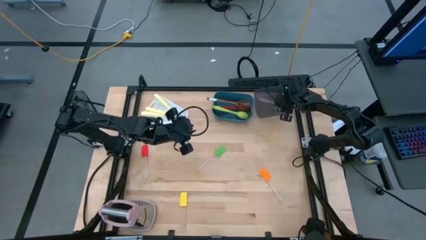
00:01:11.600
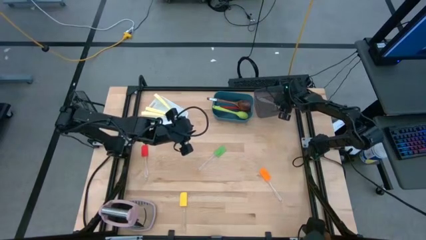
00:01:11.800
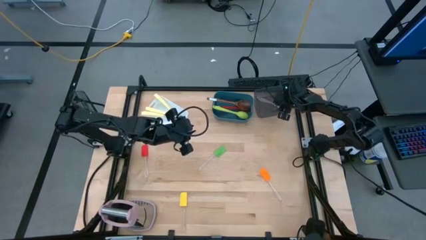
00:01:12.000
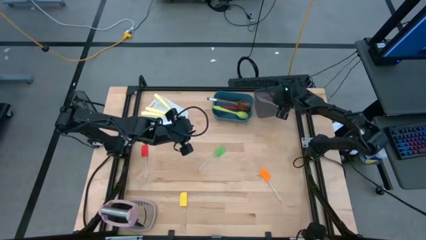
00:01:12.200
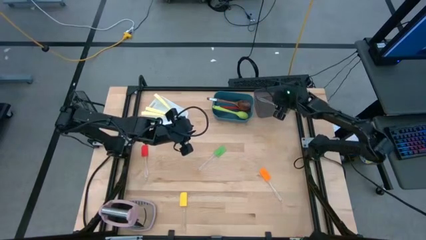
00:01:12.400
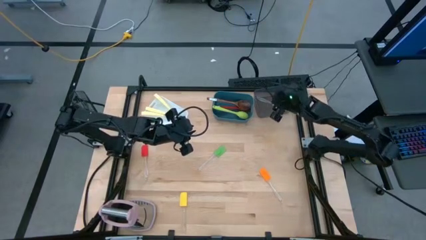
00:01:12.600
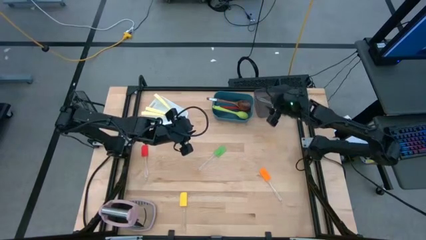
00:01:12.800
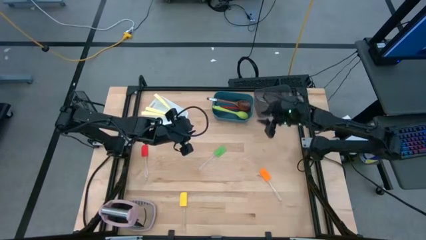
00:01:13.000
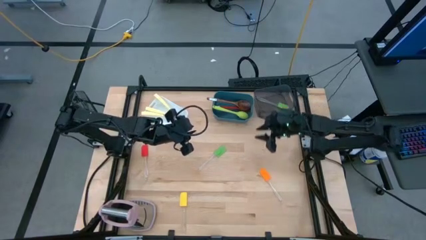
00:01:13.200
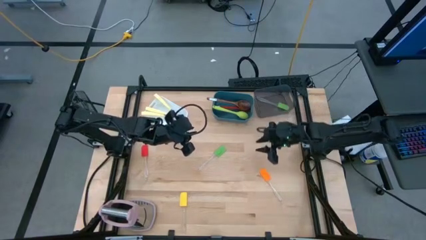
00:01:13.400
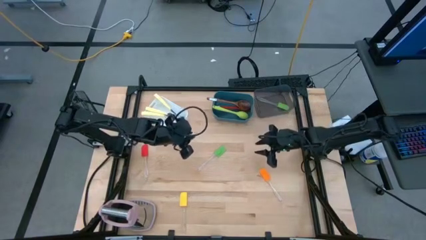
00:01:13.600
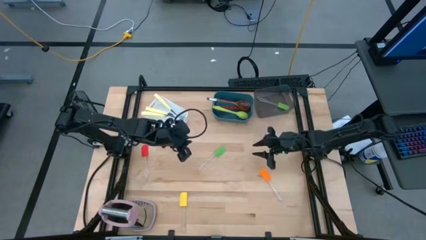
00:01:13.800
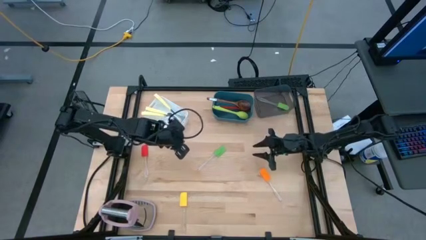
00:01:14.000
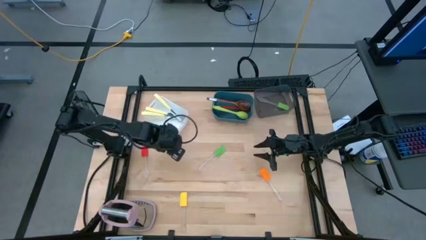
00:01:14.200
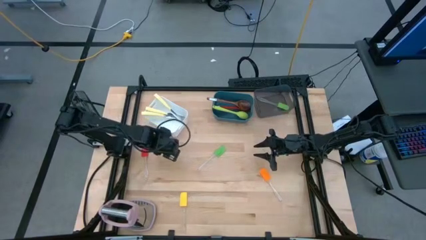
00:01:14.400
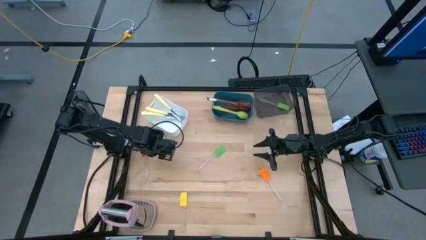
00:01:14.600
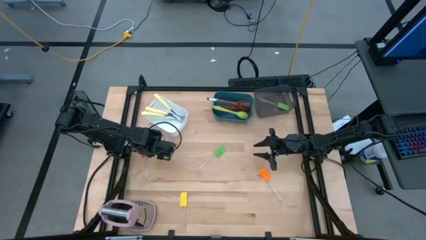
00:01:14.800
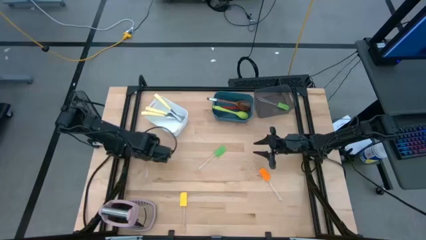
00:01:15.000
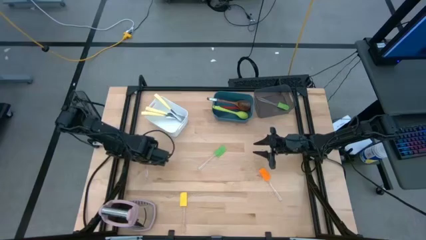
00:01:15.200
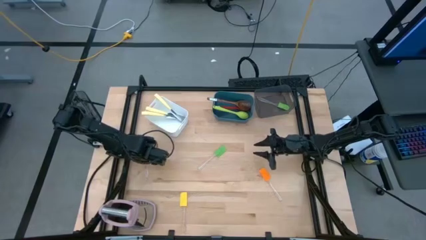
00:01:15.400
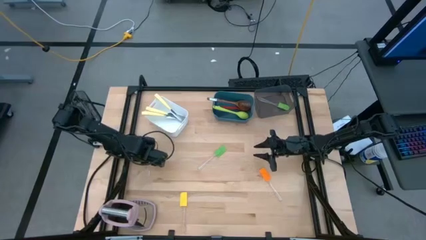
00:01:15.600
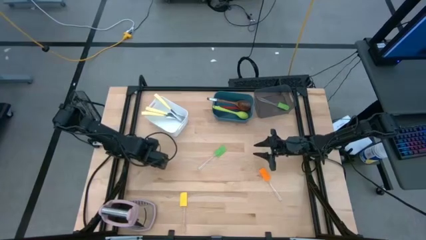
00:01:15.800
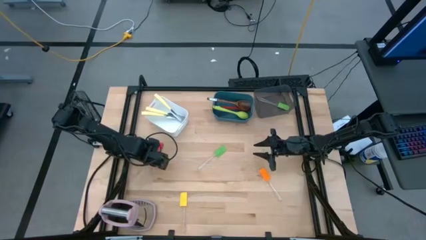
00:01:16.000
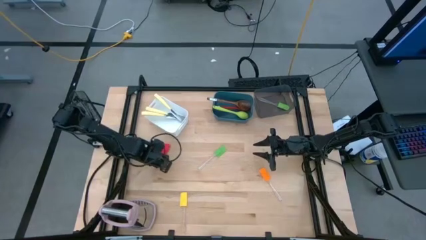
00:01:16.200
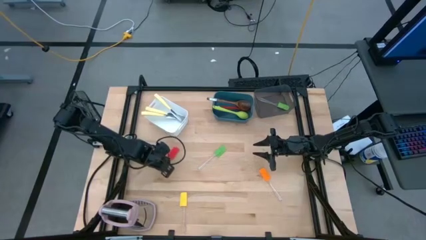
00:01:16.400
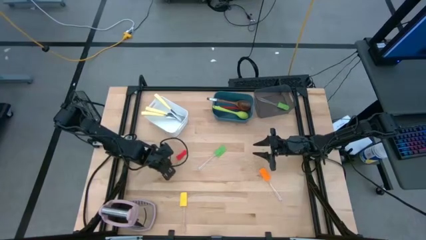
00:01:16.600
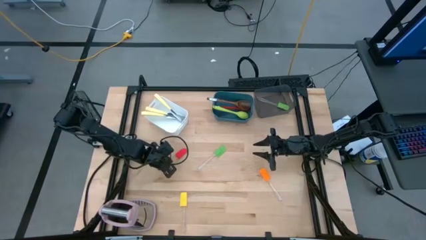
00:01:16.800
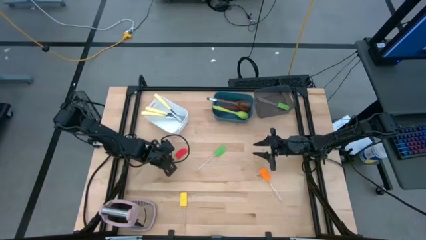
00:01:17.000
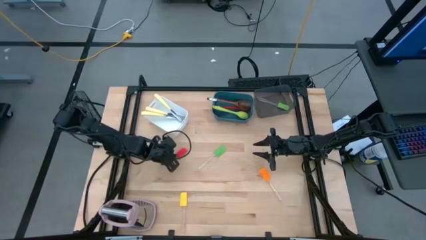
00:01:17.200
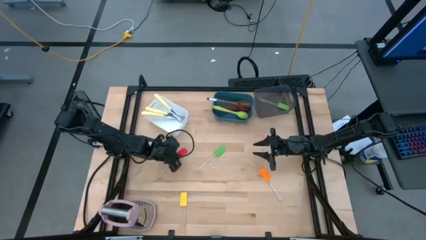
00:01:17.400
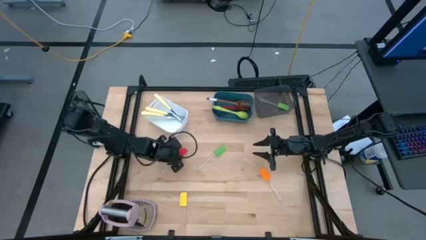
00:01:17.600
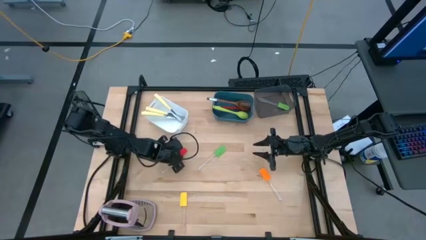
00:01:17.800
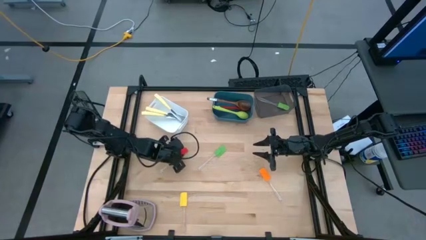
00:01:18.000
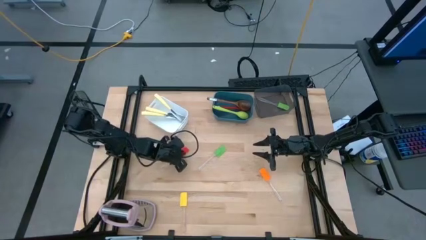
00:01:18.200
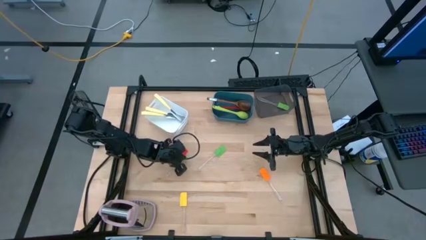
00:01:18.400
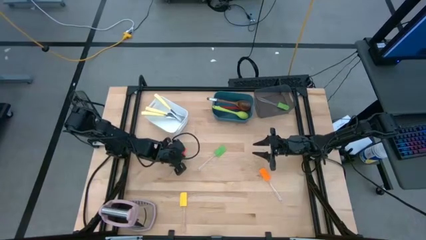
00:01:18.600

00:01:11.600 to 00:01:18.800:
Task: Pick & Place Kitchen Items
Put the red spatula into the black bin

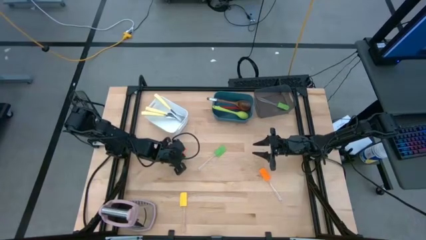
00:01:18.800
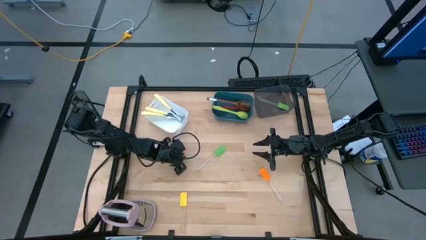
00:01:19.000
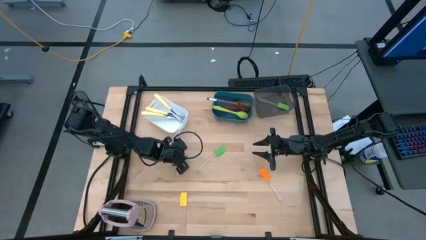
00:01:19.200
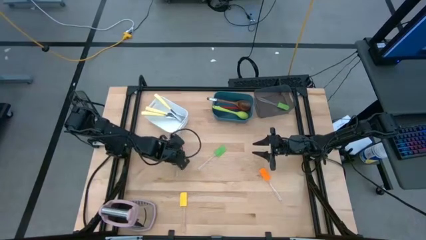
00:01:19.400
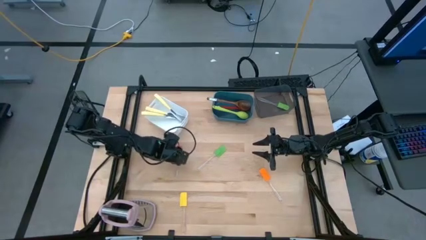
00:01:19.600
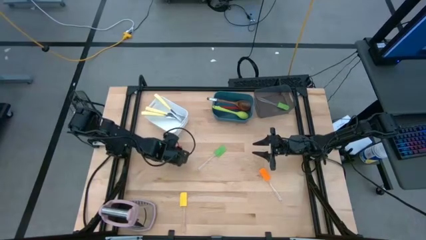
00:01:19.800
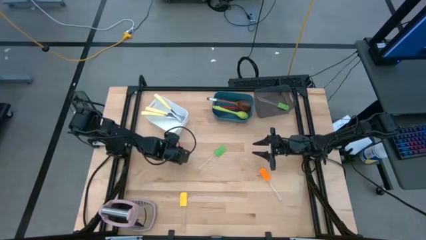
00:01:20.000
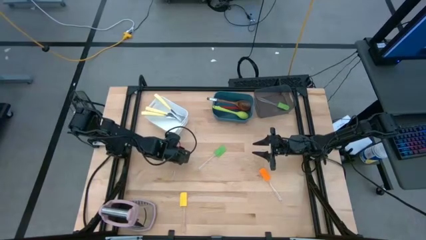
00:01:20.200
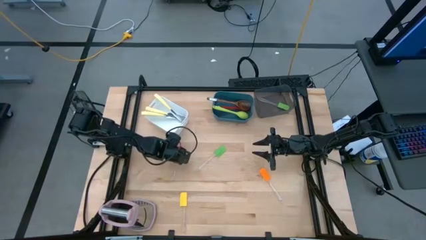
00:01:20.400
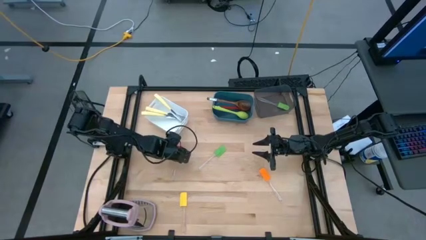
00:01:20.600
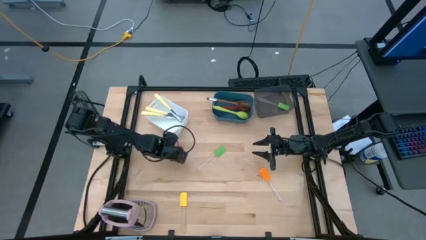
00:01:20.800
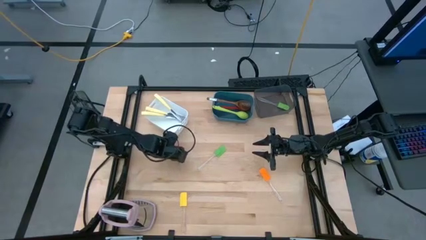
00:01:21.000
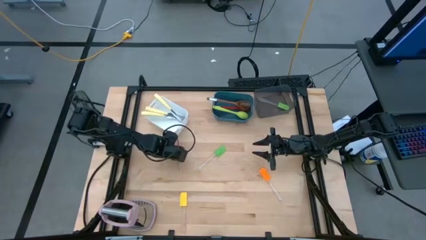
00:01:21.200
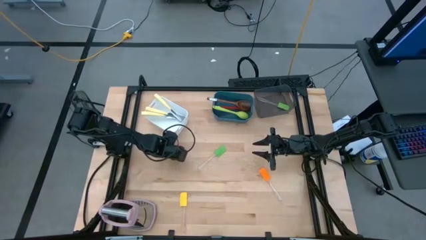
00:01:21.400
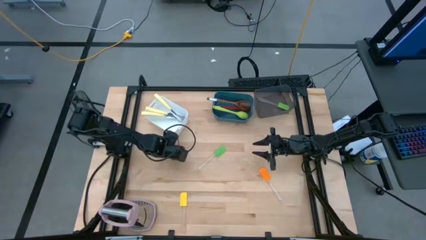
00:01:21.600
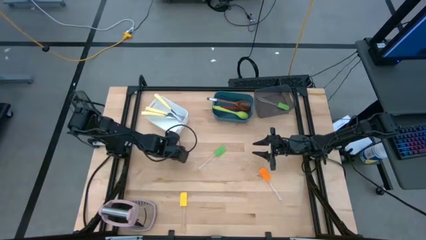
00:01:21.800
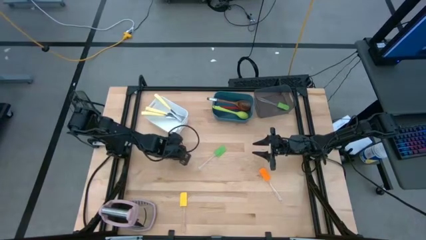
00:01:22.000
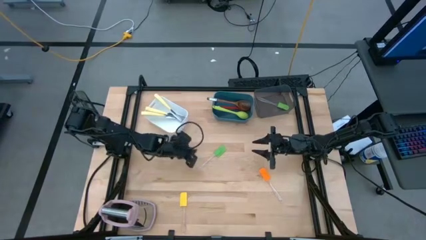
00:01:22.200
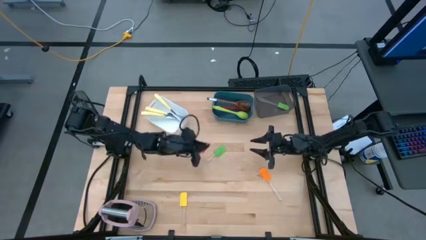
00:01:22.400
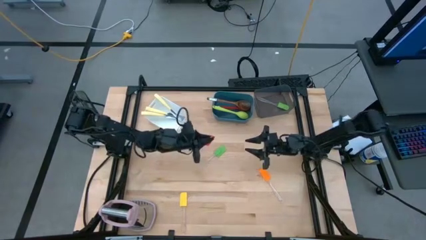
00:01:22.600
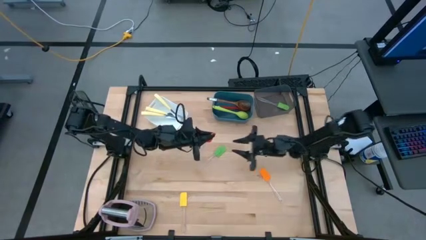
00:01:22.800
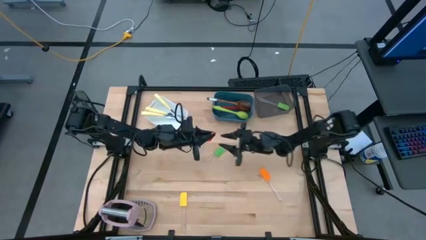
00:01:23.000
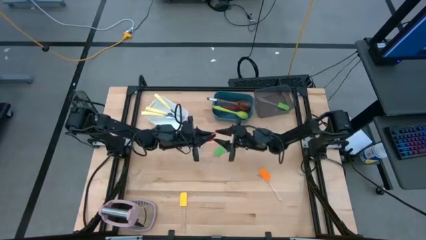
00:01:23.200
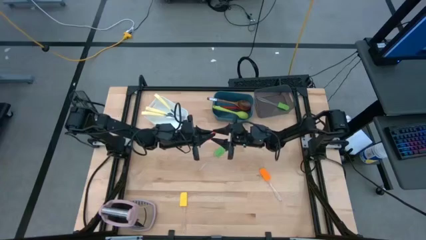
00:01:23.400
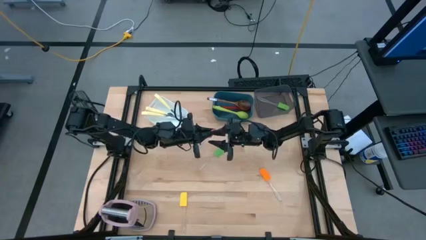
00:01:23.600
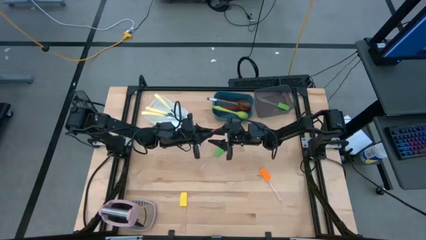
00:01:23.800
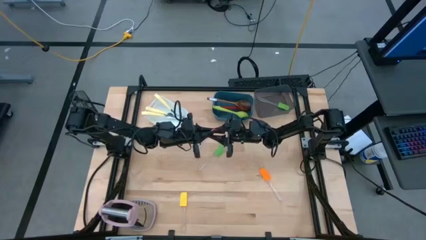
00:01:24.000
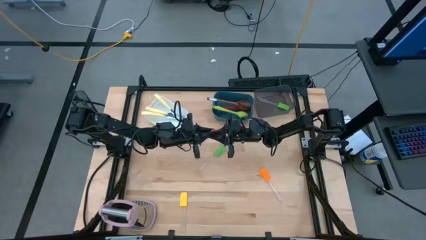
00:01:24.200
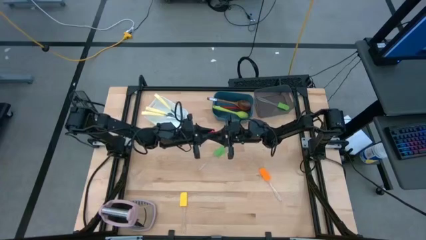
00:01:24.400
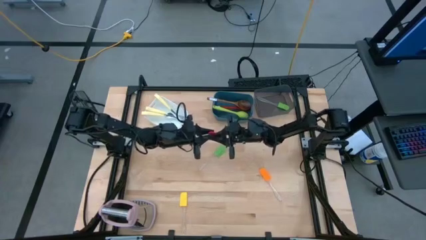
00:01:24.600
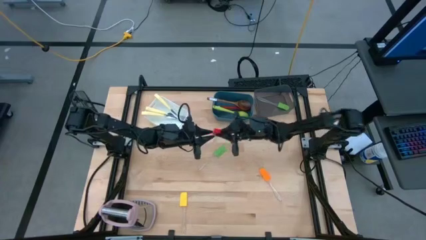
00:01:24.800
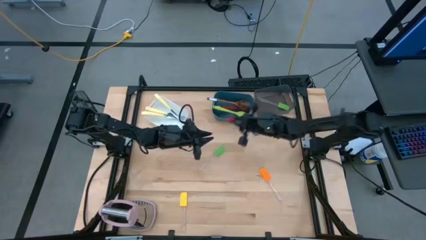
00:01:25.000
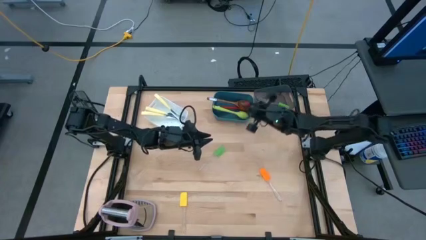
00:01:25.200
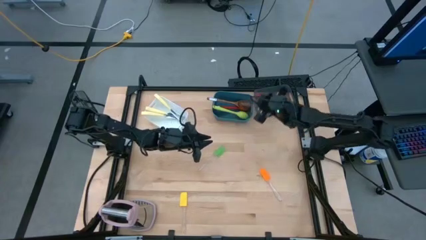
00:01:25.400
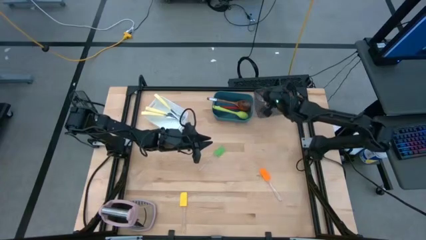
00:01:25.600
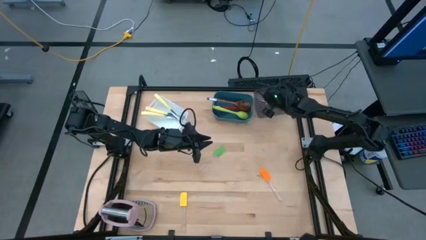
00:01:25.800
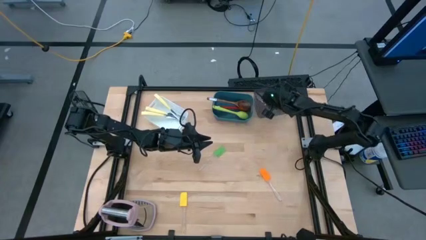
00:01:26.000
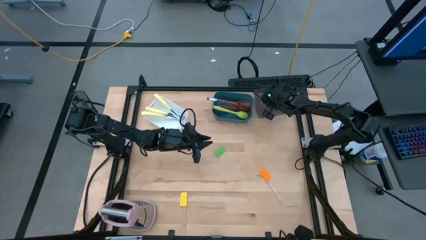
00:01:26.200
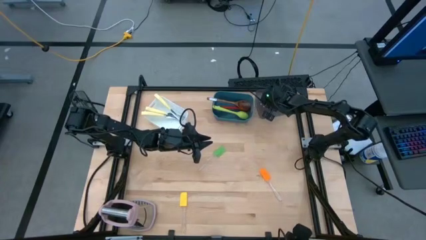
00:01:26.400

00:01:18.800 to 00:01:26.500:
Put the red spatula into the black bin

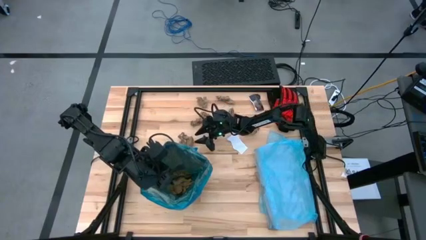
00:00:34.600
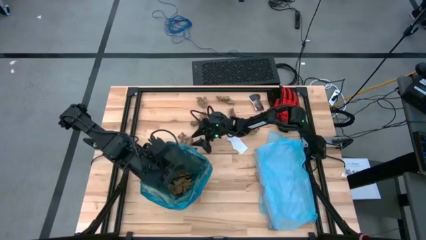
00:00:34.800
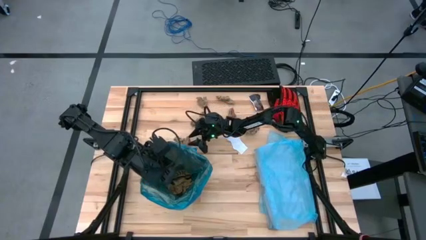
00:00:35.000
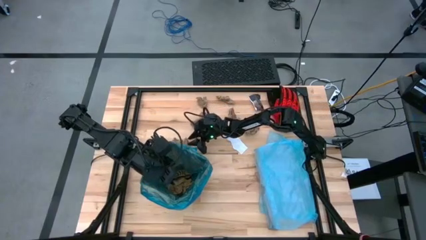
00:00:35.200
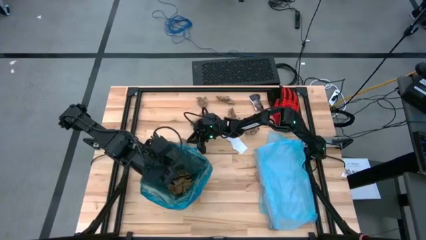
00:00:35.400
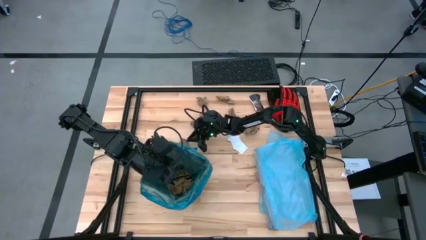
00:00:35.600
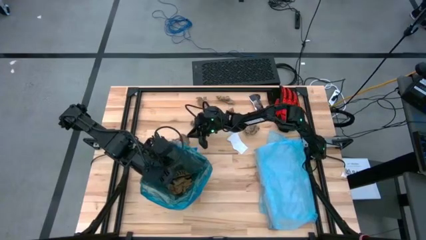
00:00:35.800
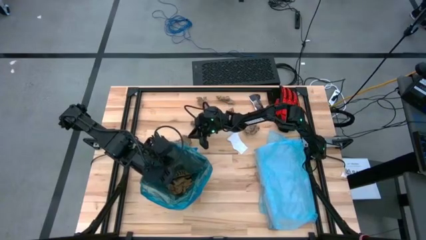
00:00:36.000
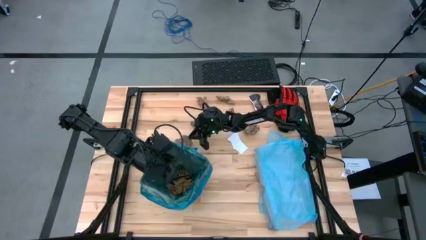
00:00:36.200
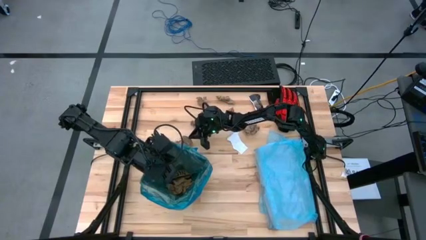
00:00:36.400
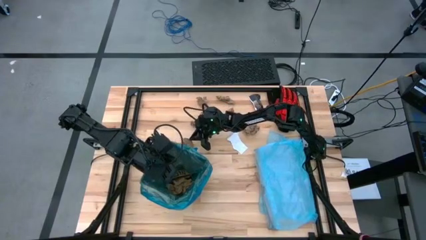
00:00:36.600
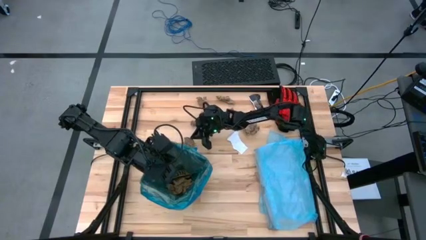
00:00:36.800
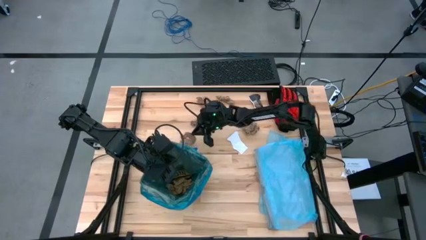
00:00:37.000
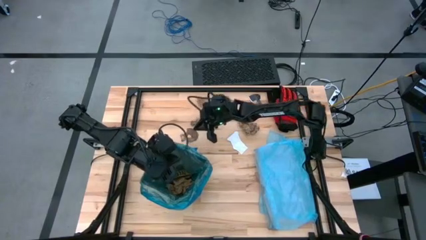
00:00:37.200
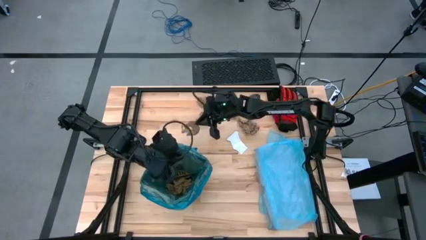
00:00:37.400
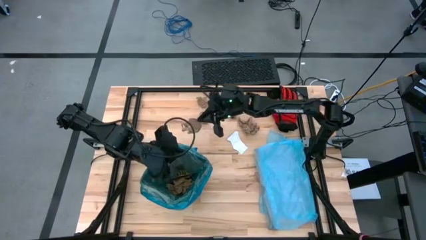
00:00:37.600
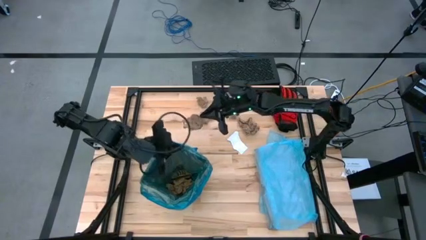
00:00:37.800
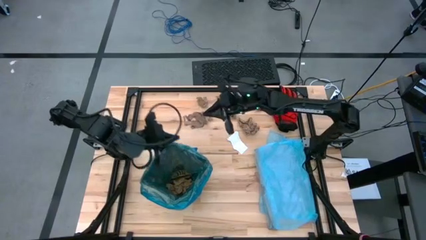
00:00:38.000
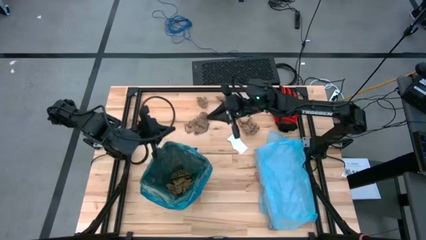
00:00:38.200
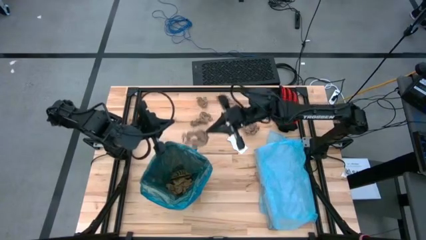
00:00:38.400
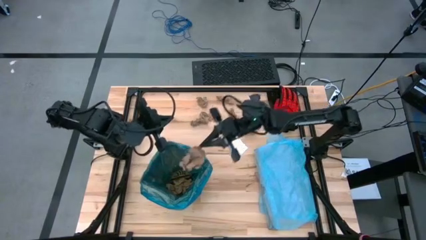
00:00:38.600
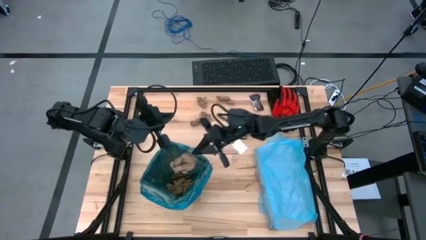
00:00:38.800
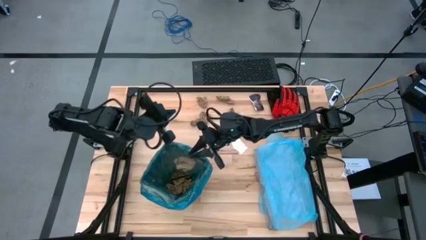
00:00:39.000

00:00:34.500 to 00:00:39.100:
Task: place trash/remove bag and relplace
Put the brown napkin into the trash bin
